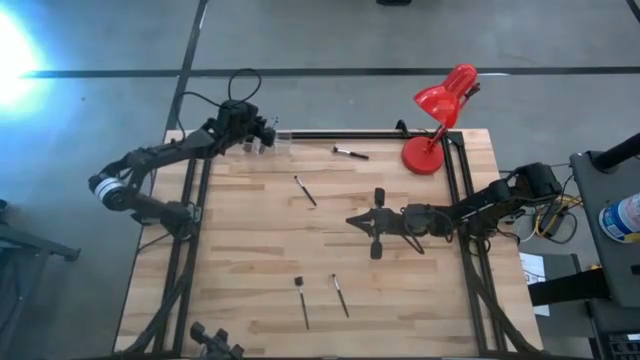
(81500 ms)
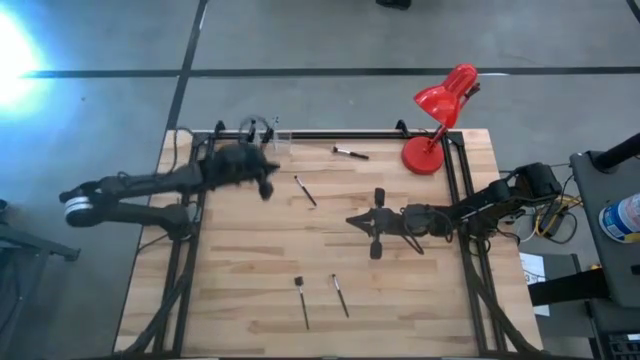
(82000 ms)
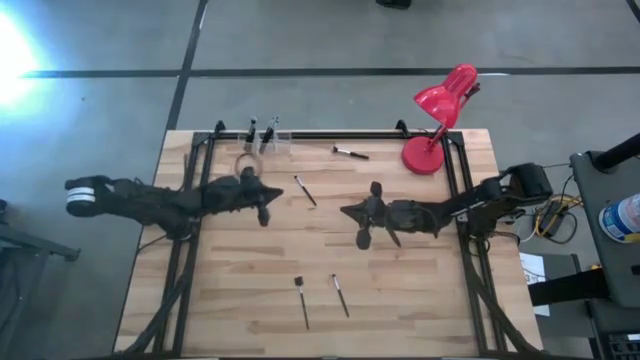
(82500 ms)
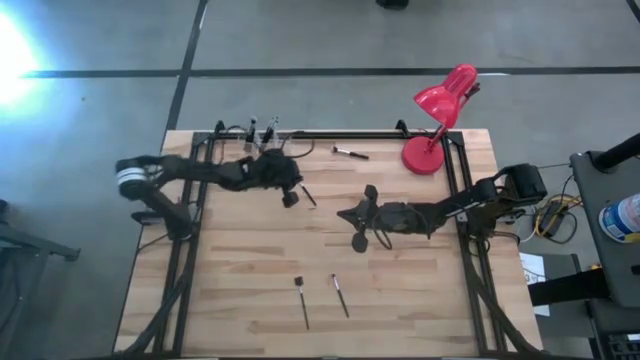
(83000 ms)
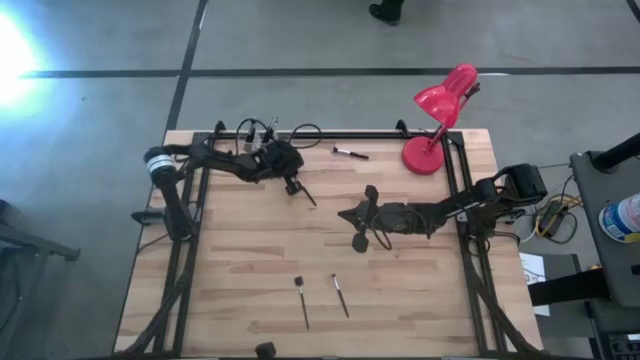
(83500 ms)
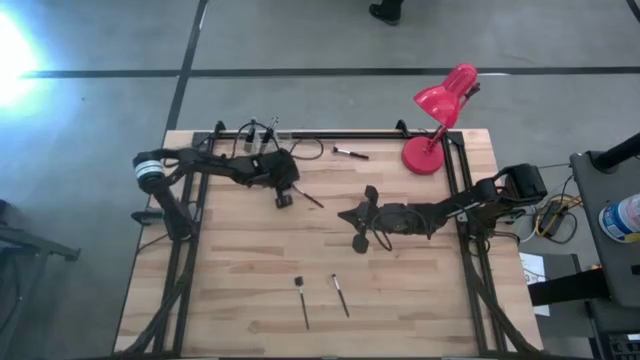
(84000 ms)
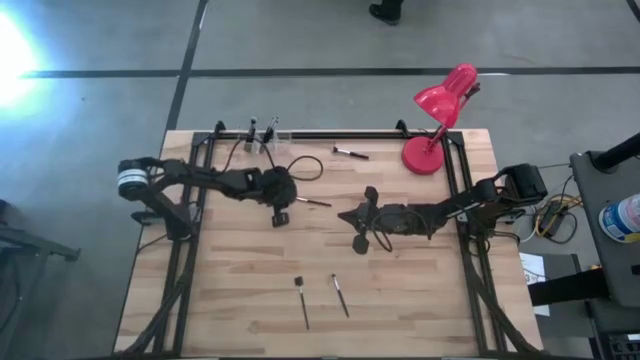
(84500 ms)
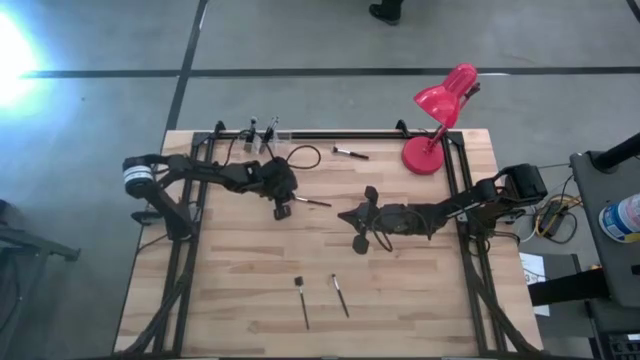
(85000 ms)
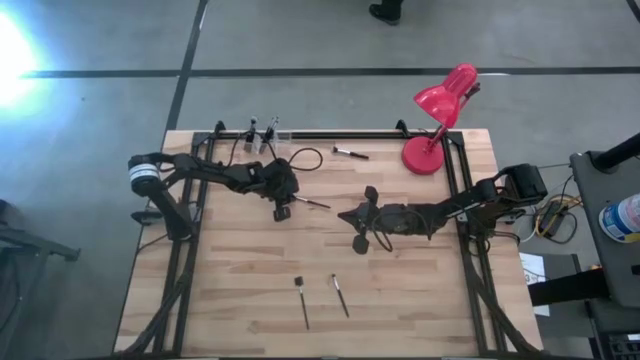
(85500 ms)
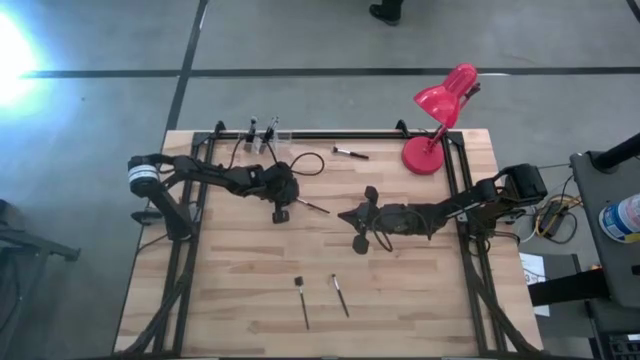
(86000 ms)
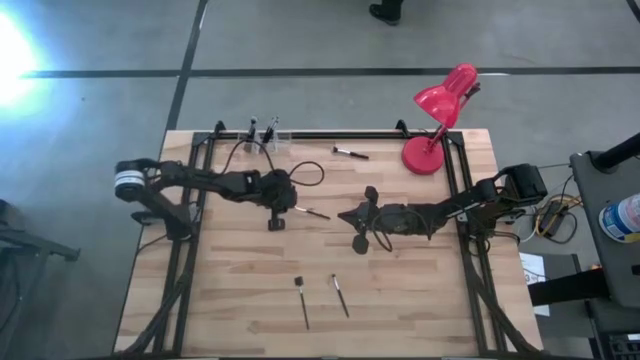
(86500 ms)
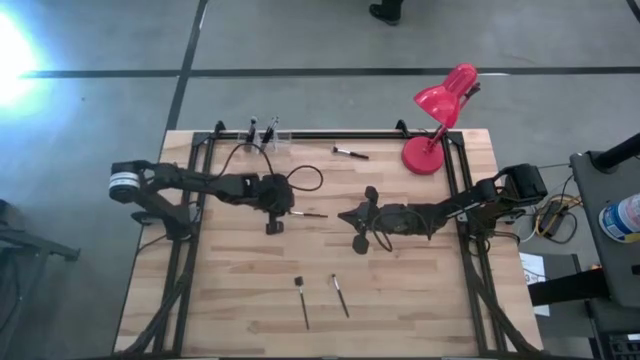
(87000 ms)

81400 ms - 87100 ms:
Task: Put items in baskets/containers
Put the black eyeshadow brush into the transparent organizer

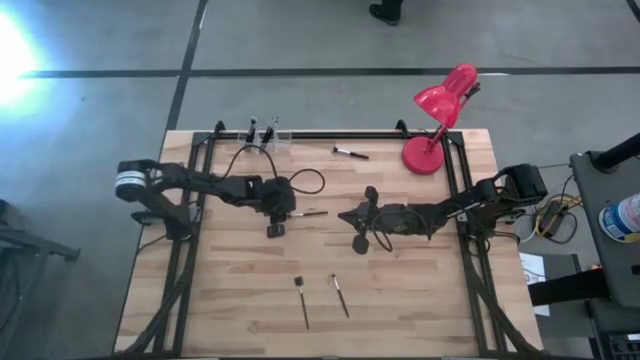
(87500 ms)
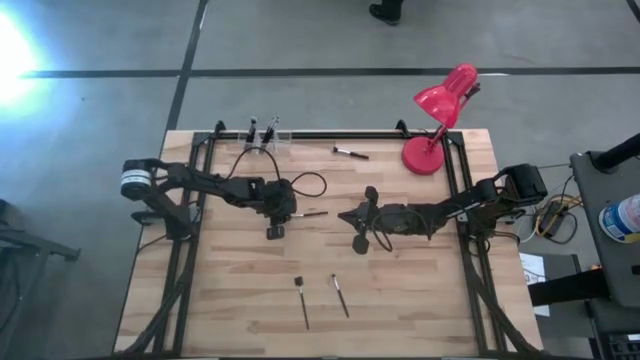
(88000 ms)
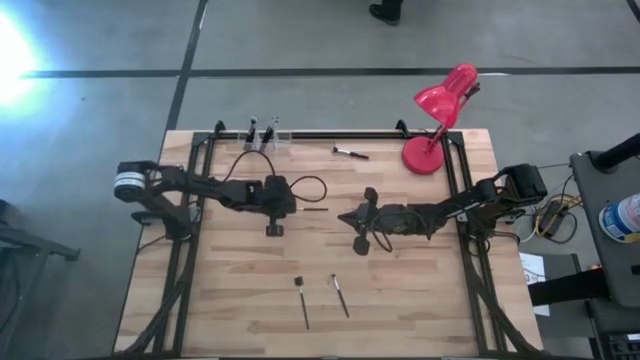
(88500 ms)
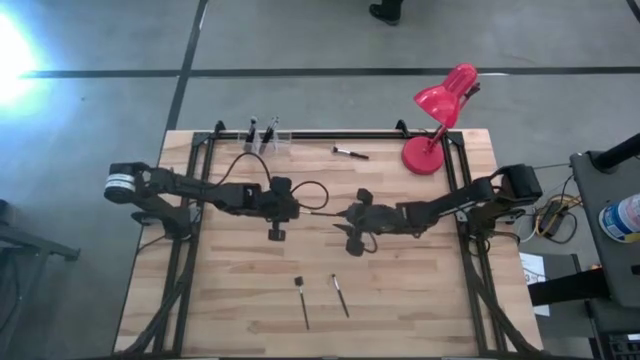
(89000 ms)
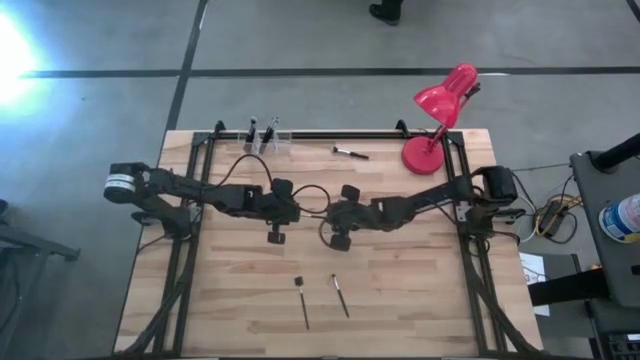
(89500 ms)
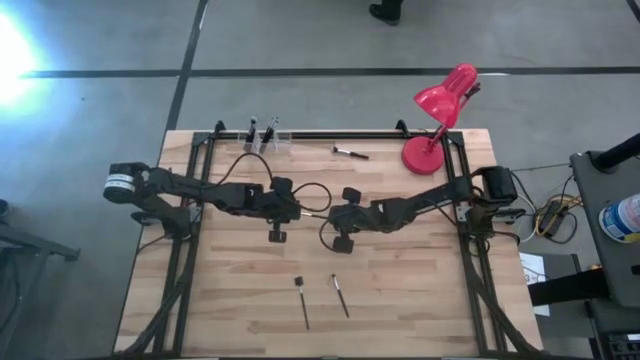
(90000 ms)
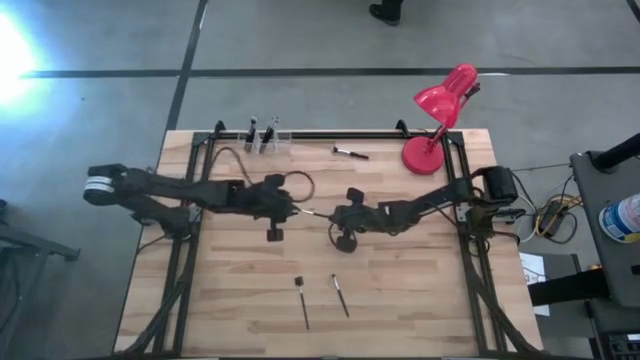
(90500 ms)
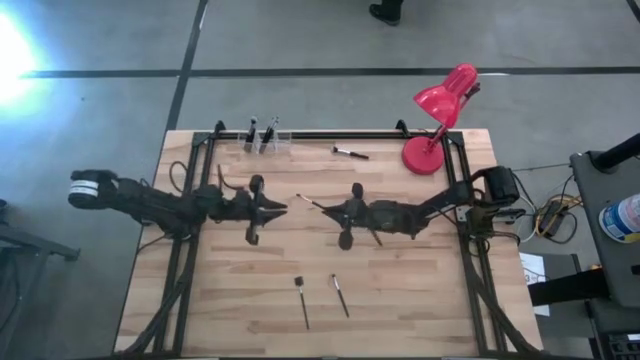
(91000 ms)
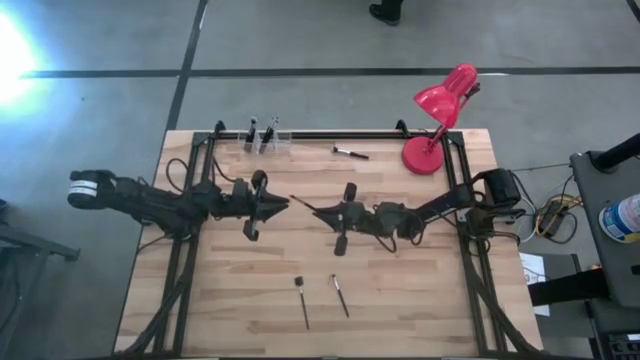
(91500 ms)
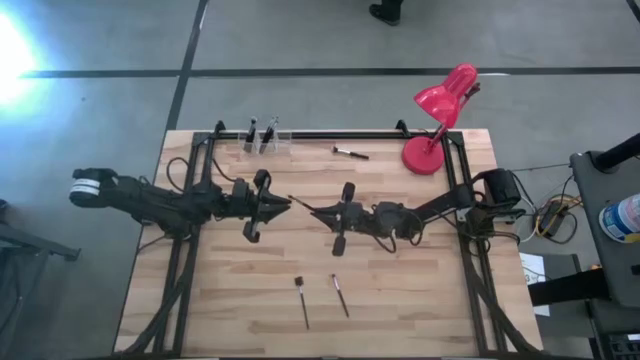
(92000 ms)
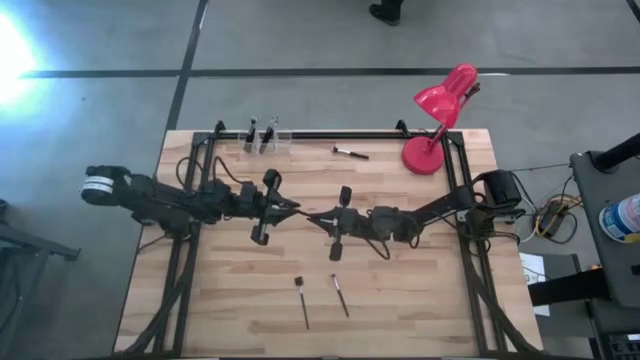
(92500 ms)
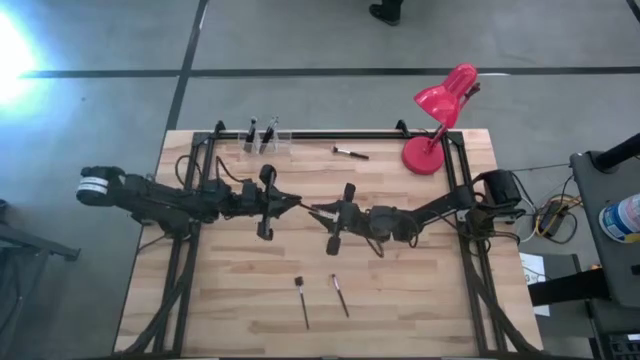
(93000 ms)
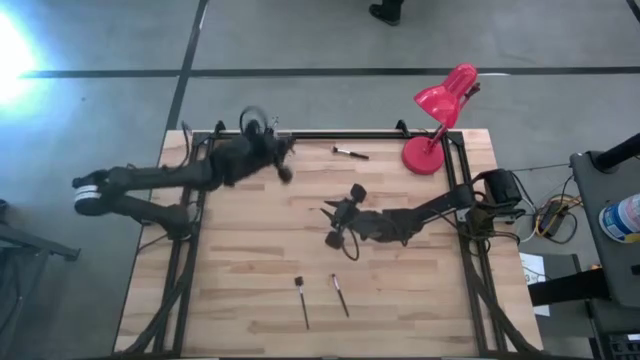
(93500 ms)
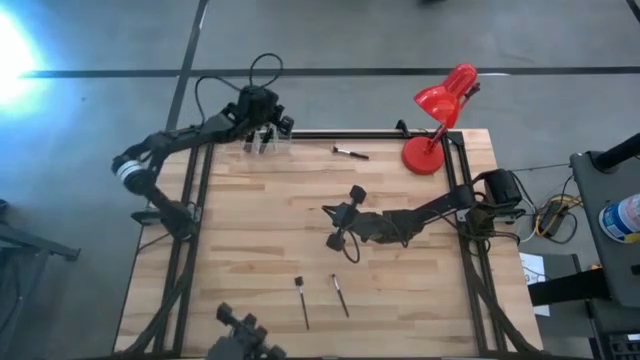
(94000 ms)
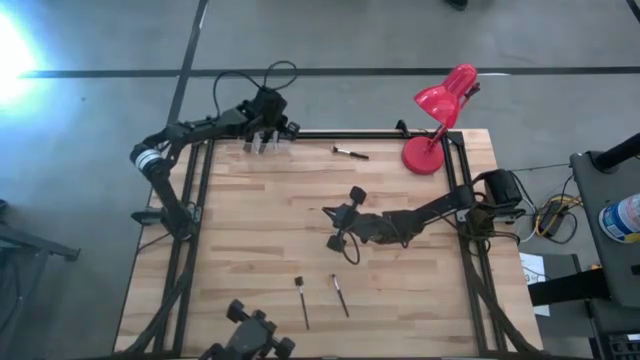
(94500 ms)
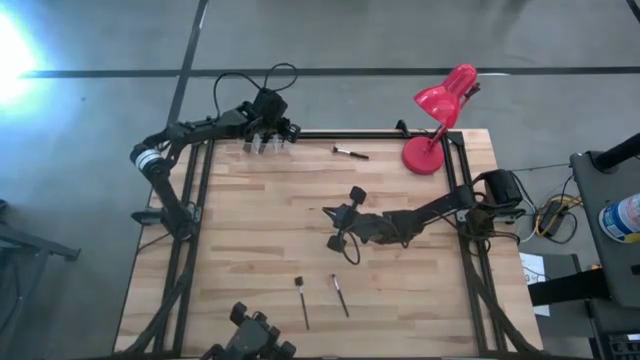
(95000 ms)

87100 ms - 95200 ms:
Put the black eyeshadow brush into the transparent organizer

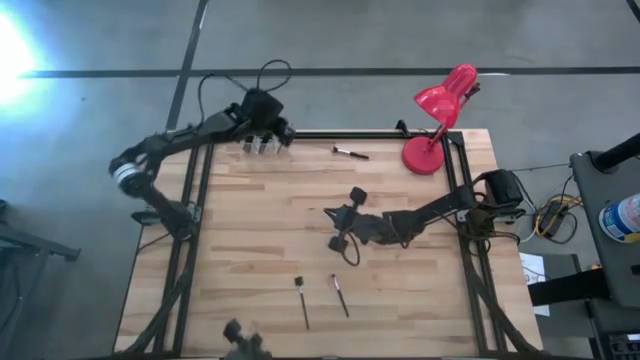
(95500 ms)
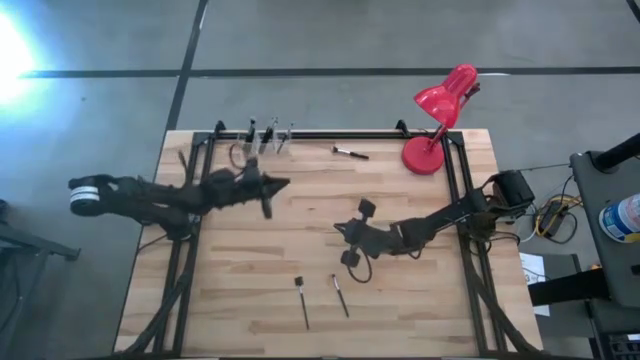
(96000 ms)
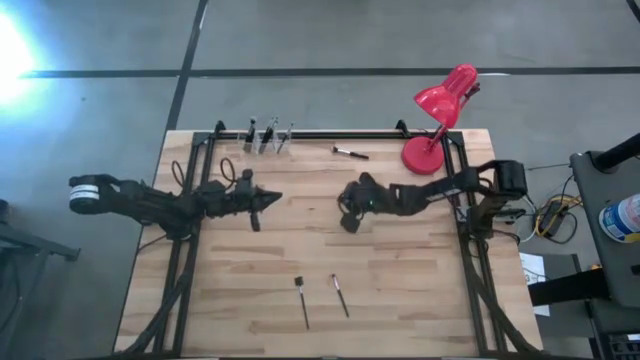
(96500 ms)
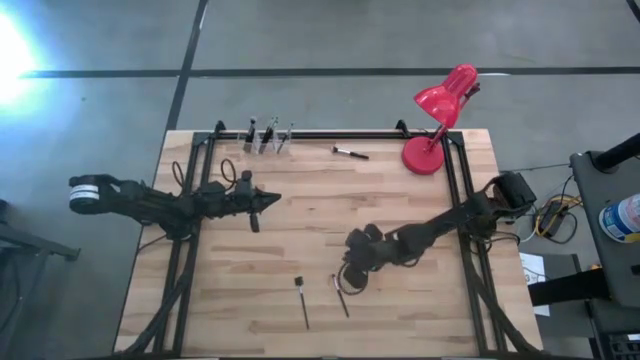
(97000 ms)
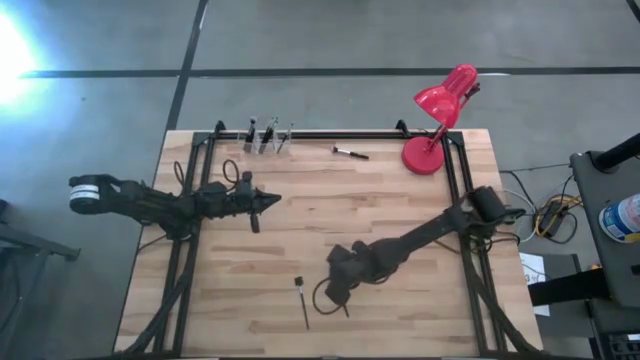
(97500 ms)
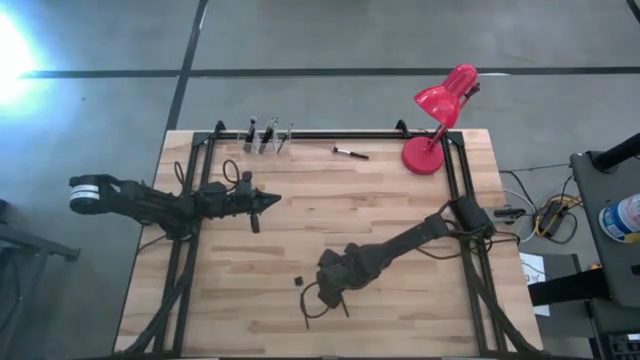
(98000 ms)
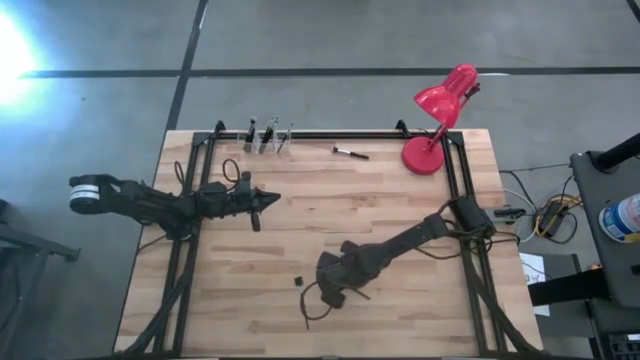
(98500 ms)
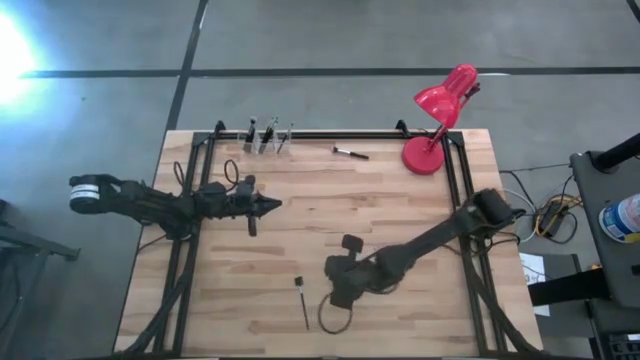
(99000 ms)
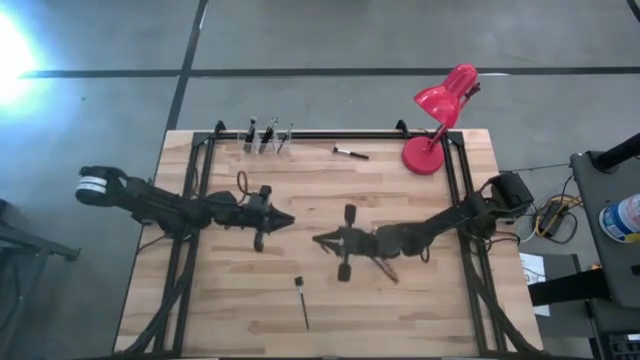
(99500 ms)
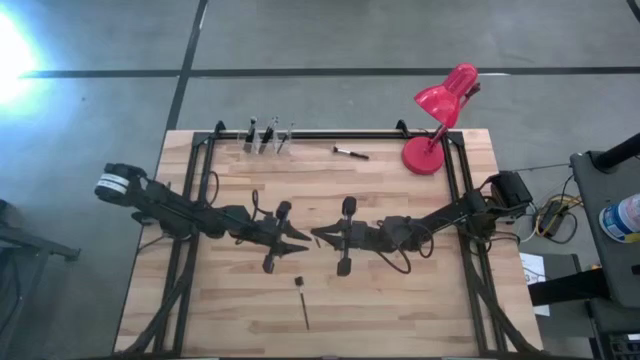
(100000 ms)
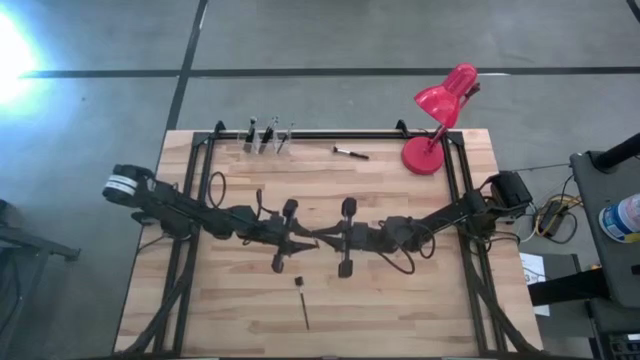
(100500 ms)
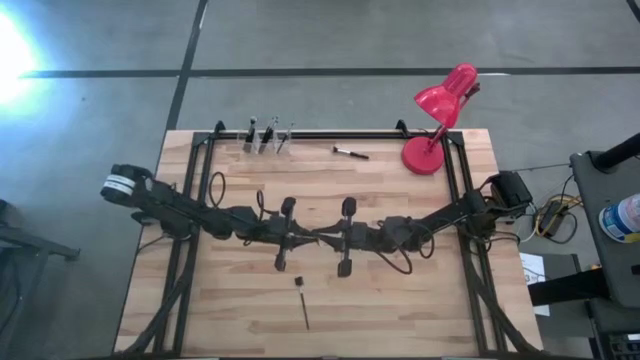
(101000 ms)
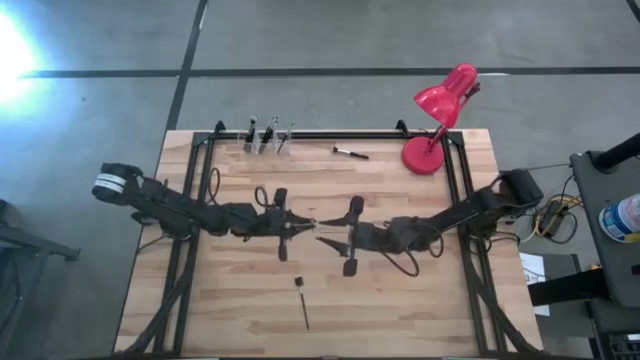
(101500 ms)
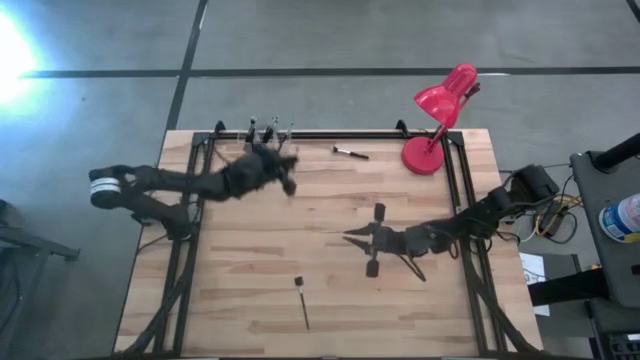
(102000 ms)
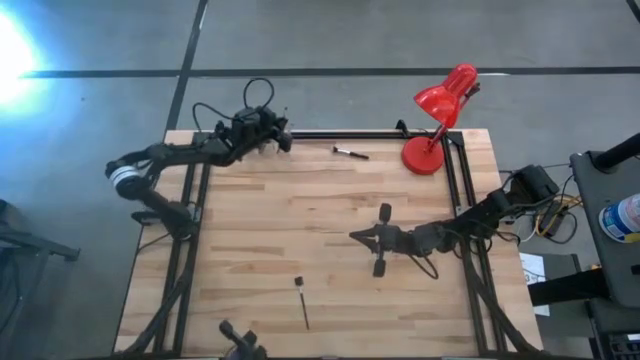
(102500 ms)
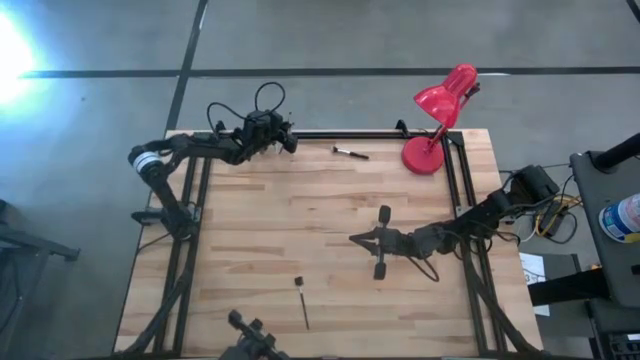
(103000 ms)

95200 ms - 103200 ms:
Put the black eyeshadow brush into the transparent organizer
